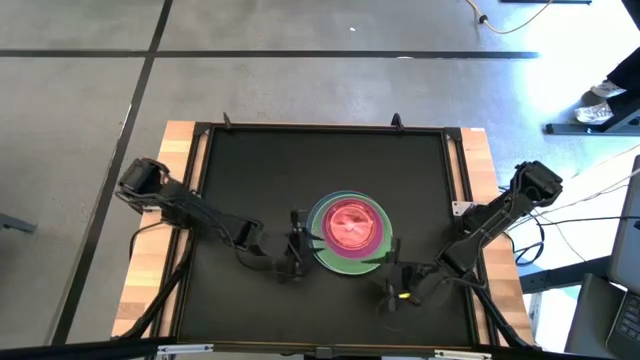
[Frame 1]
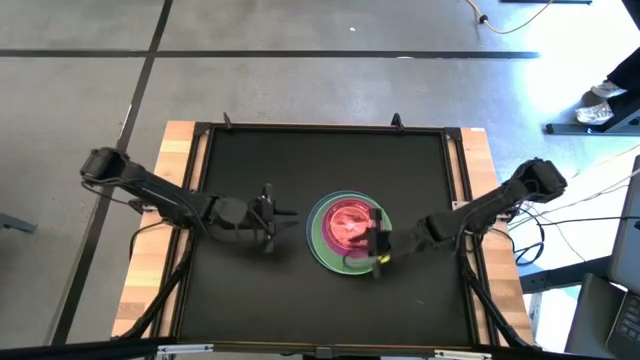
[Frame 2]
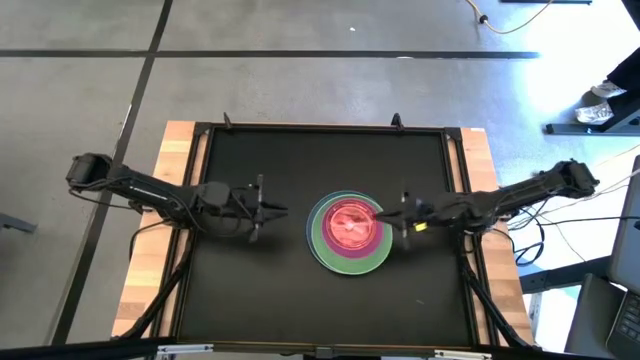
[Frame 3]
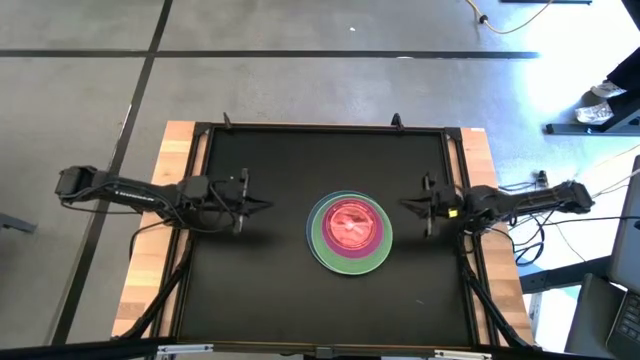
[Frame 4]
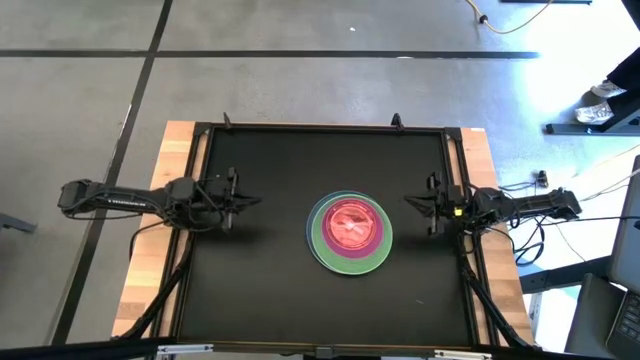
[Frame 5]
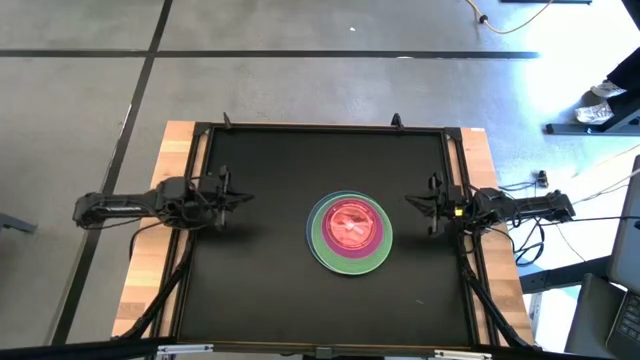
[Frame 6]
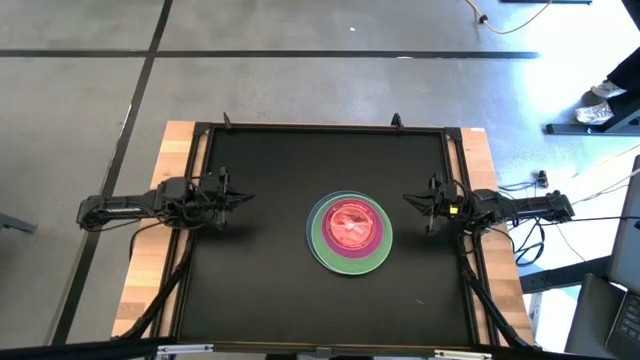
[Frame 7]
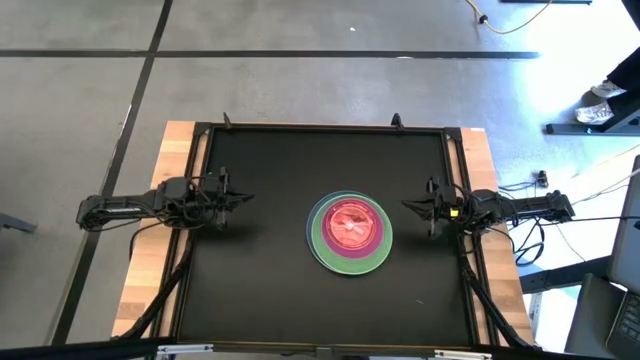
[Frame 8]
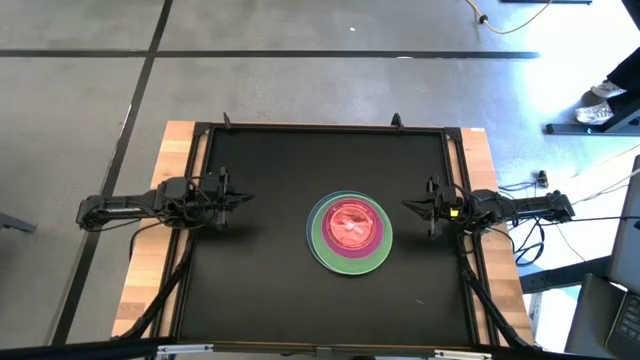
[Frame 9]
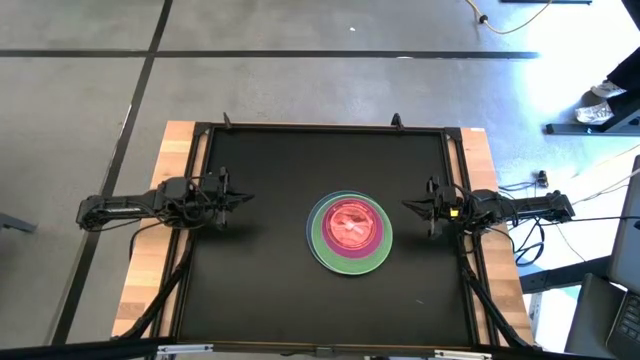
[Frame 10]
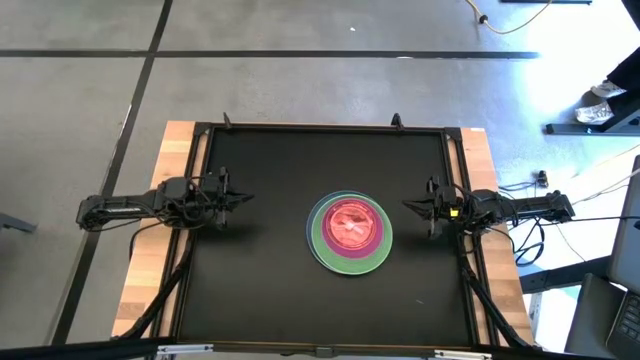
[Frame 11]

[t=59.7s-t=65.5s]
Task: Stack plastic plates
Return to Home Position

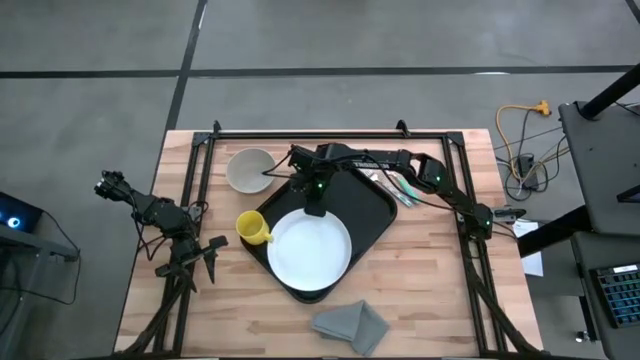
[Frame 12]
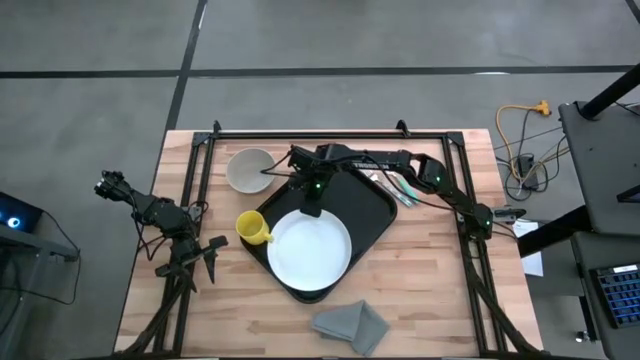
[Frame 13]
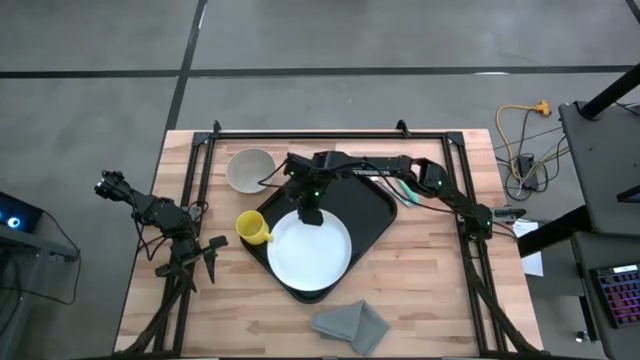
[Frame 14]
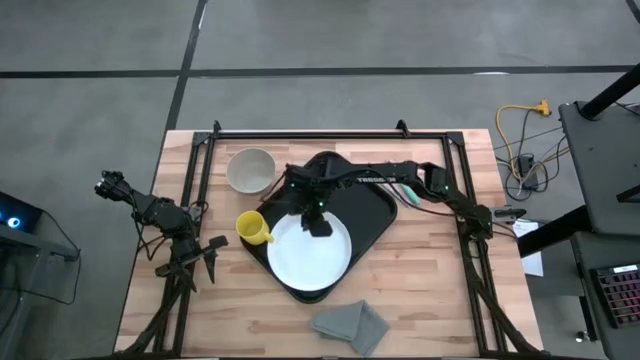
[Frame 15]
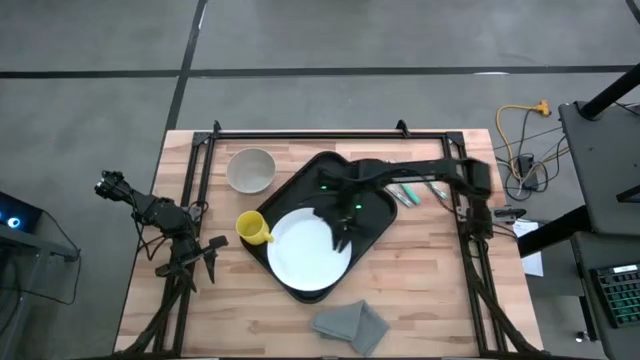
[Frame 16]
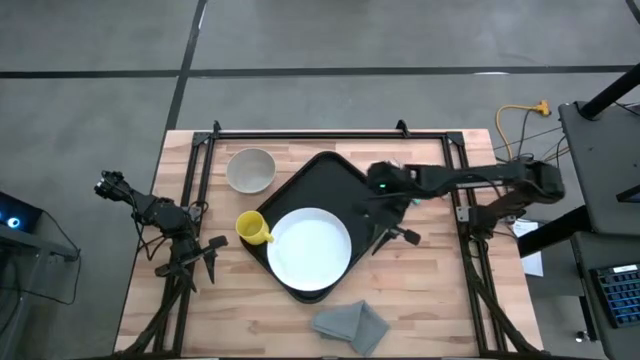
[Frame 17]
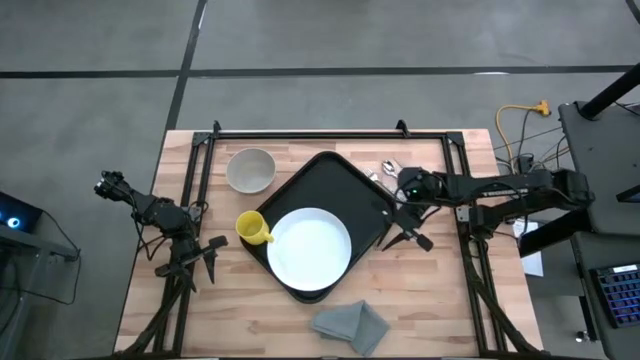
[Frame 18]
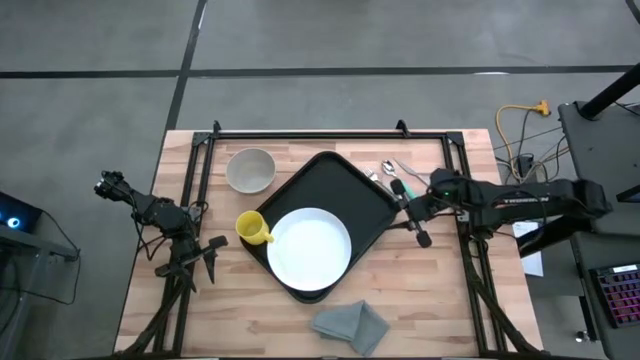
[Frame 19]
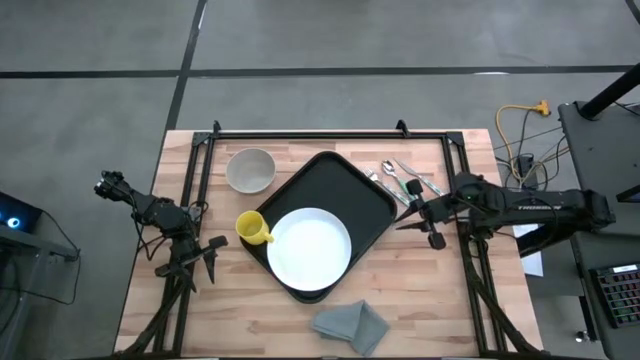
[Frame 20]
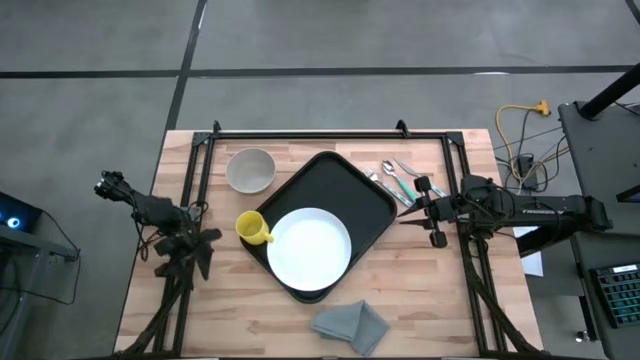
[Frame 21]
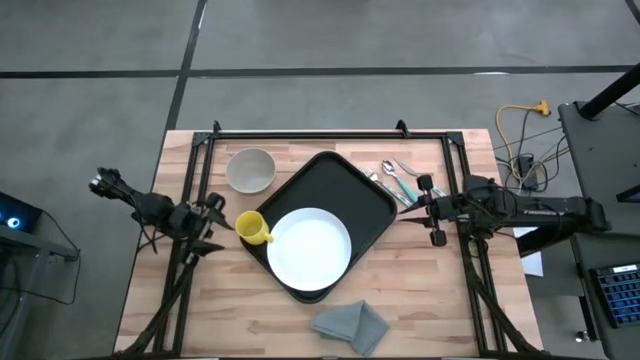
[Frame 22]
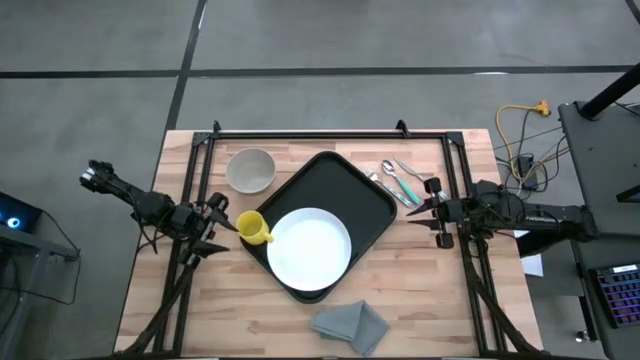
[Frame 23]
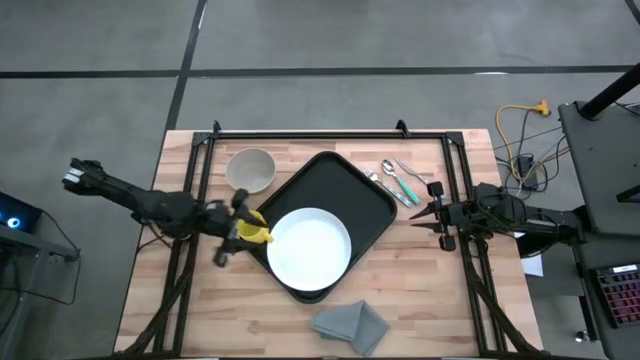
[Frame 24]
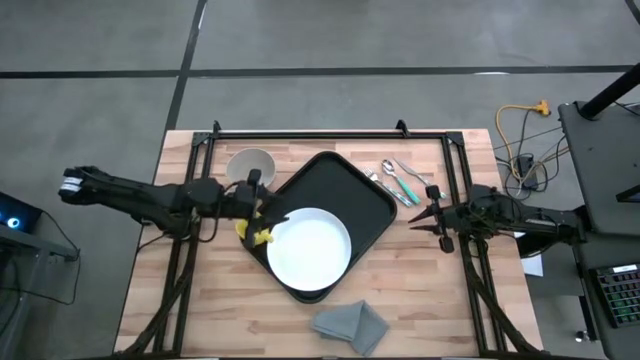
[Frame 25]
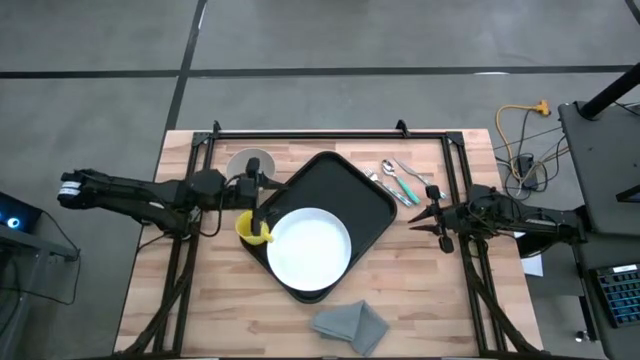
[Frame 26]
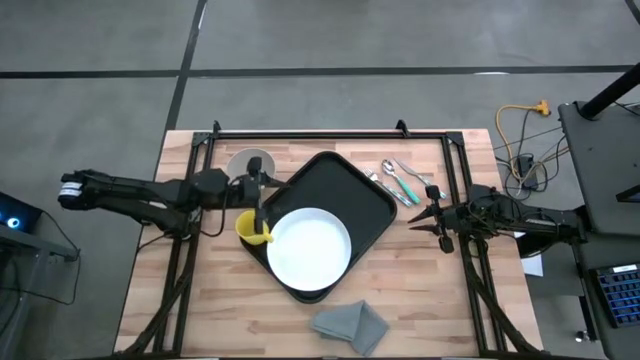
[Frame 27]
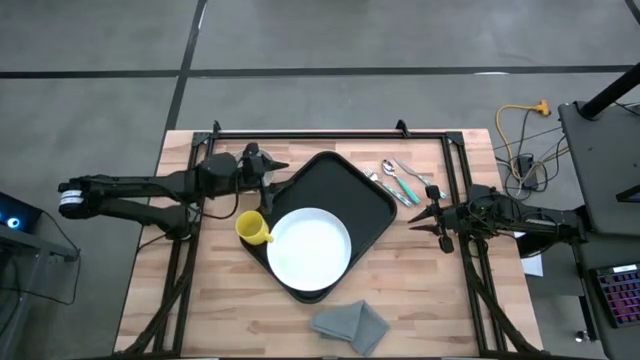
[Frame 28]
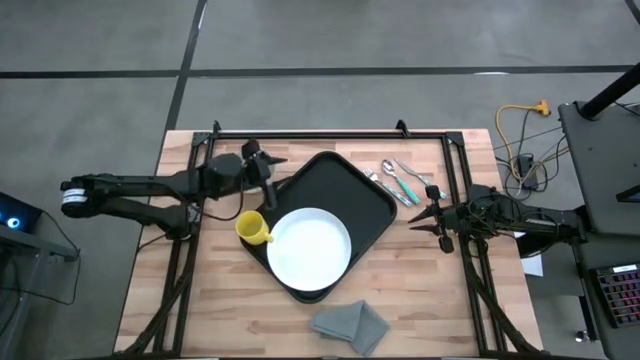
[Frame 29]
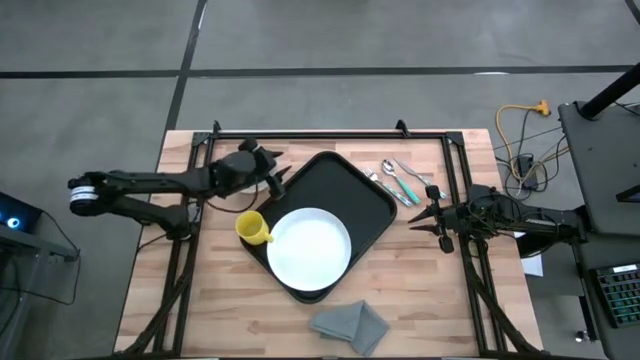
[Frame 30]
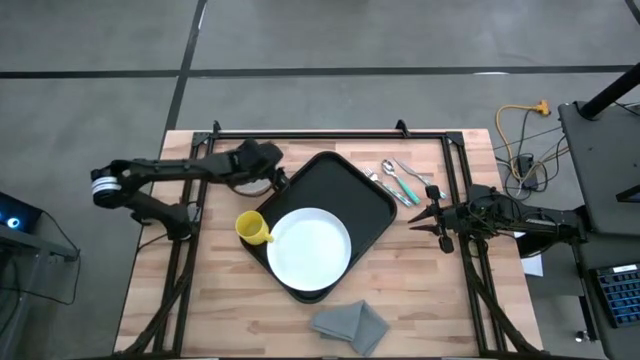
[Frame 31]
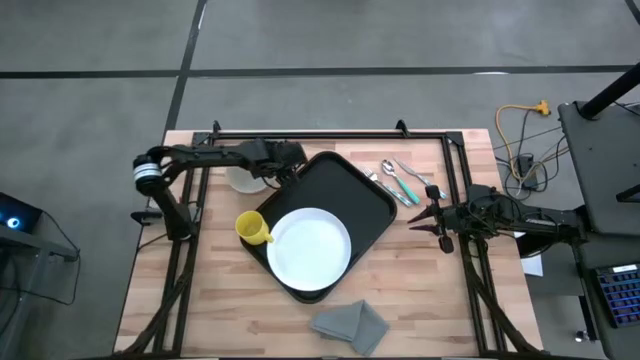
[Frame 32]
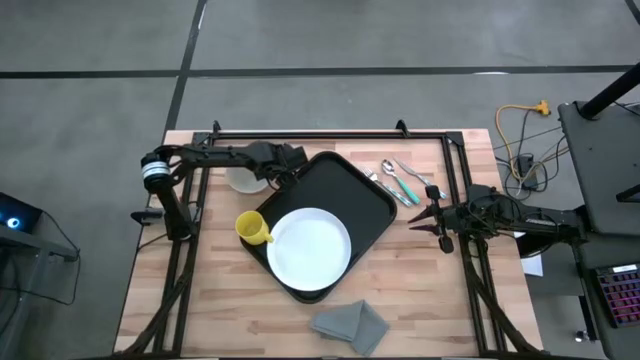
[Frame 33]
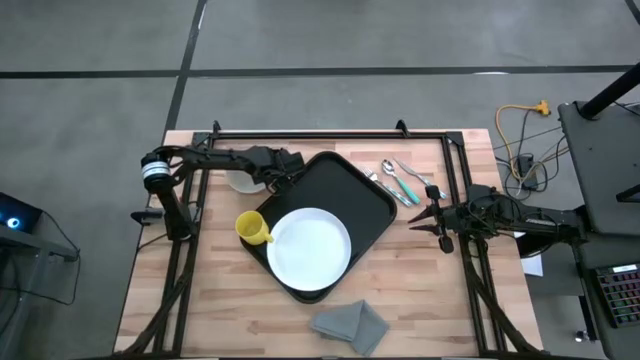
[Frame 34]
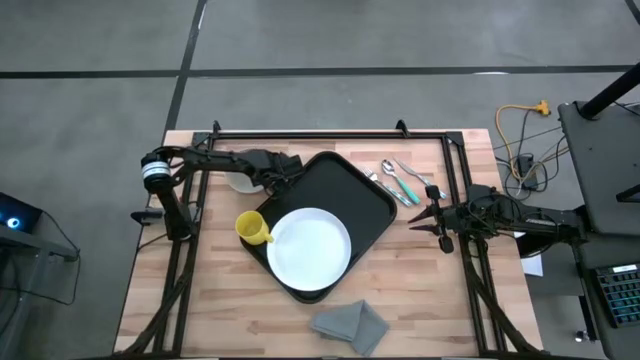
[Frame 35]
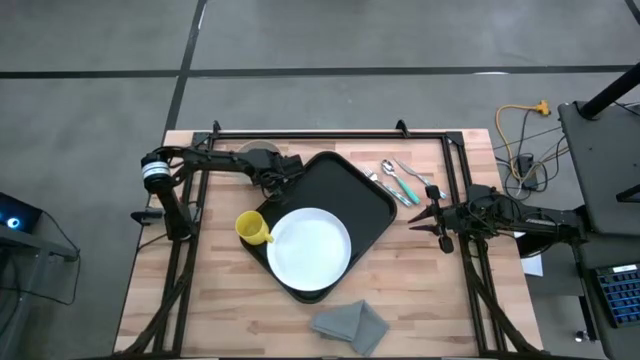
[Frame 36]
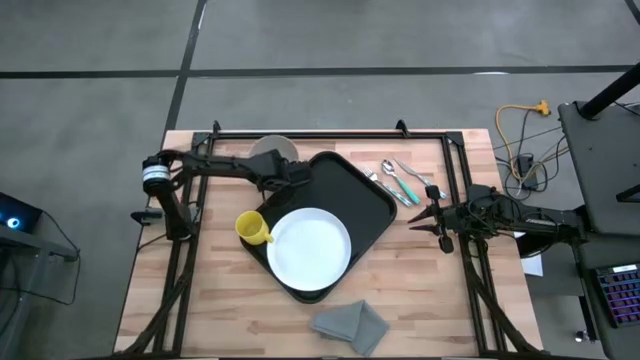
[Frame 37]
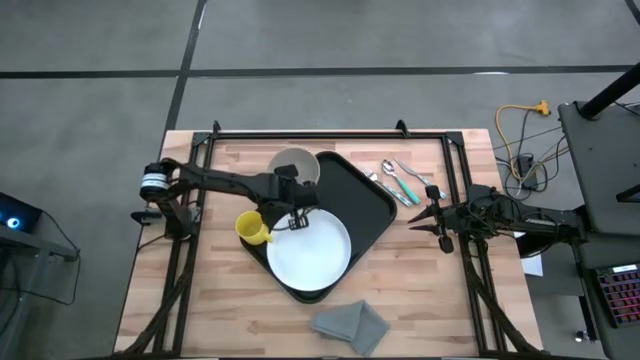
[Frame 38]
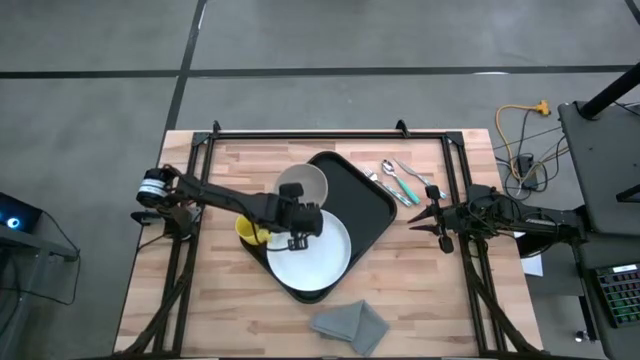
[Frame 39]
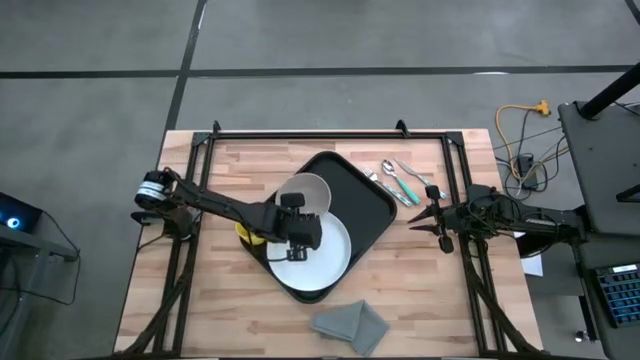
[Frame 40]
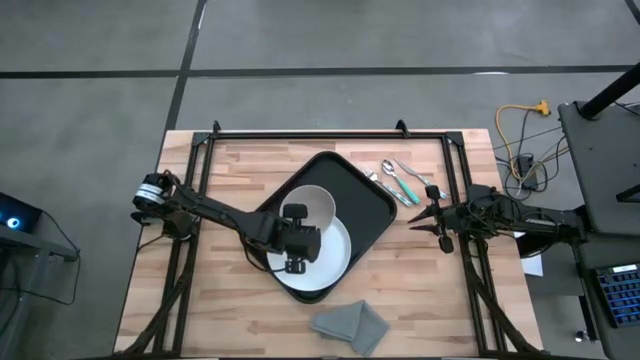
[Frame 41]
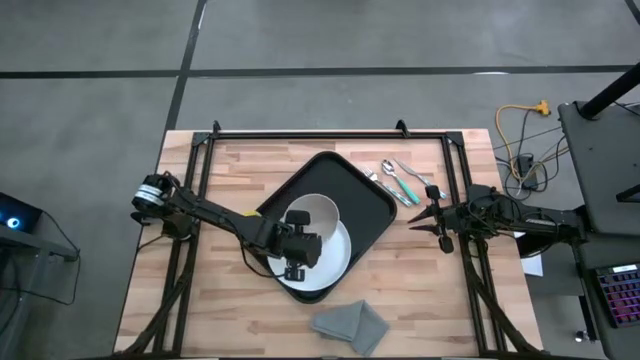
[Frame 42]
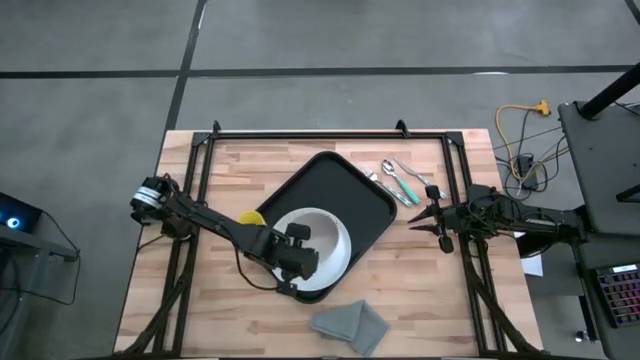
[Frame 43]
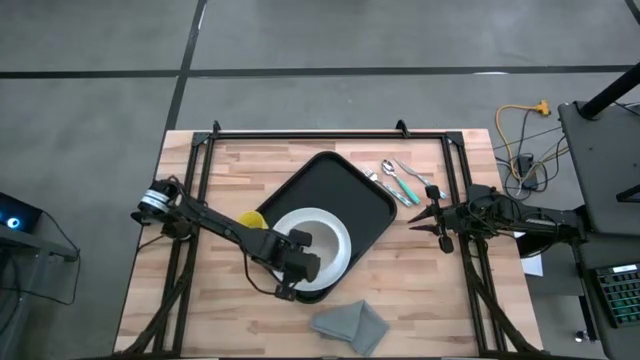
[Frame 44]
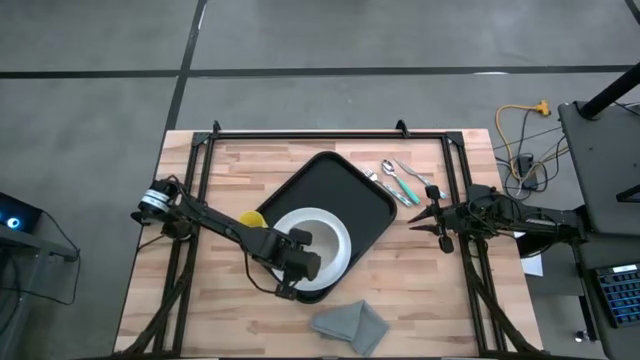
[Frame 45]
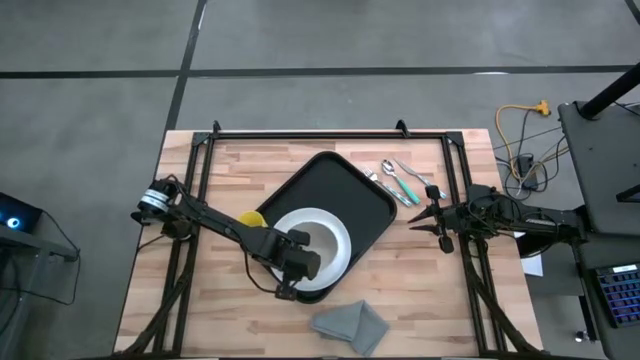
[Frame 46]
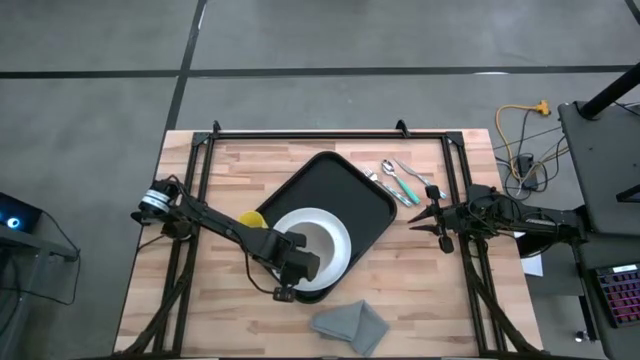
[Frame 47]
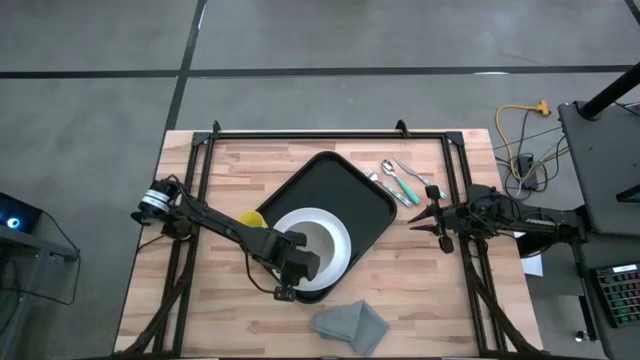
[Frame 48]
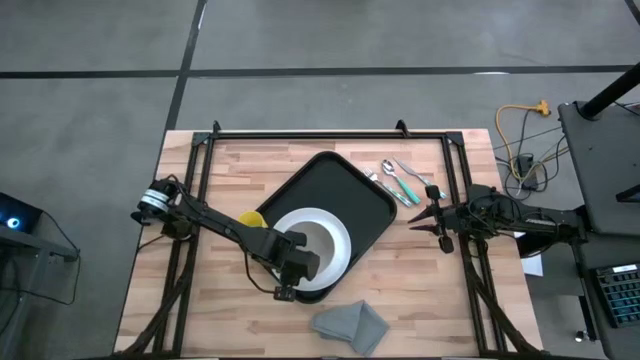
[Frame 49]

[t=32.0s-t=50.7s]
Task: Set up tray
Put the gray bowl on top of the white plate on the black serving tray
